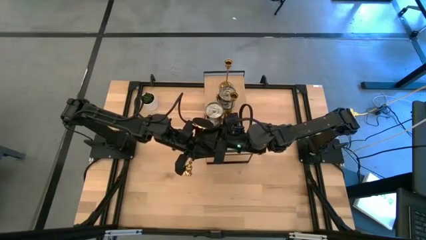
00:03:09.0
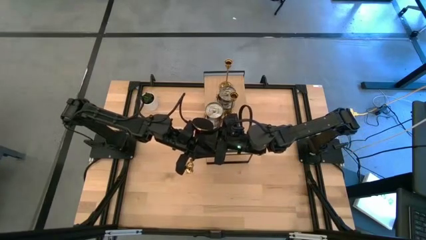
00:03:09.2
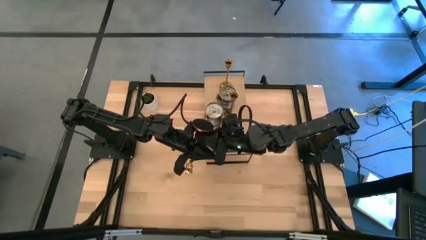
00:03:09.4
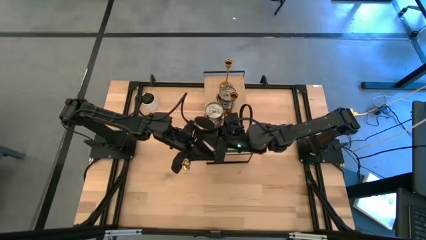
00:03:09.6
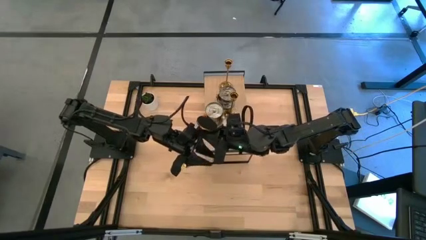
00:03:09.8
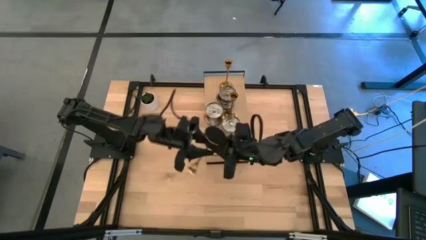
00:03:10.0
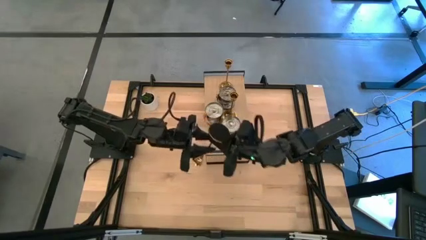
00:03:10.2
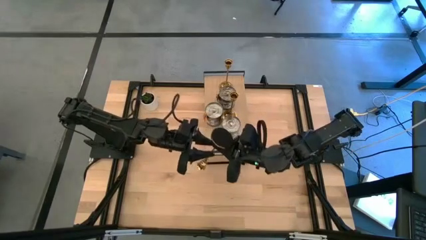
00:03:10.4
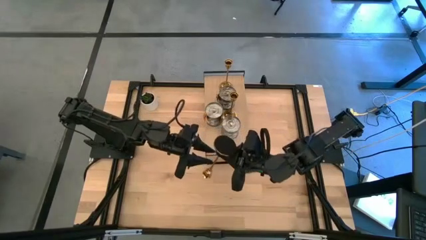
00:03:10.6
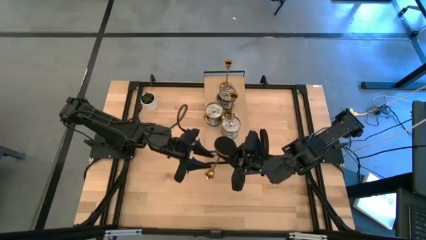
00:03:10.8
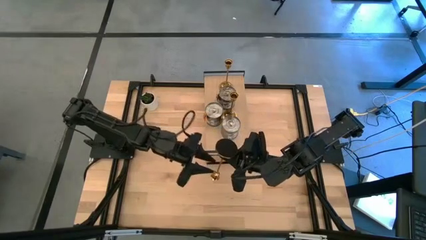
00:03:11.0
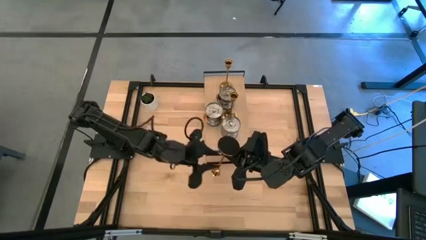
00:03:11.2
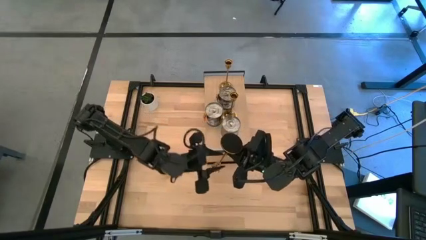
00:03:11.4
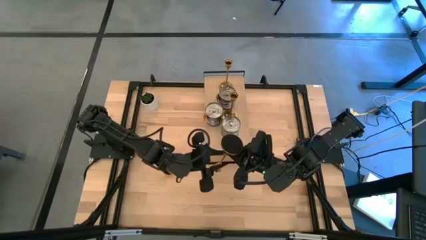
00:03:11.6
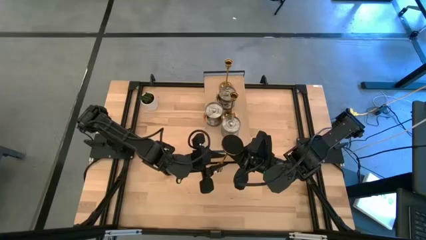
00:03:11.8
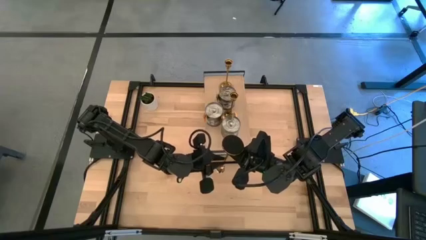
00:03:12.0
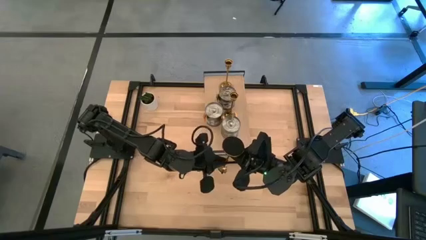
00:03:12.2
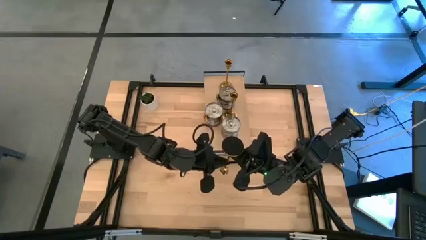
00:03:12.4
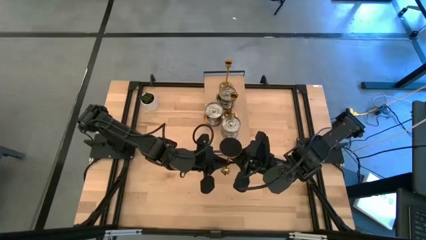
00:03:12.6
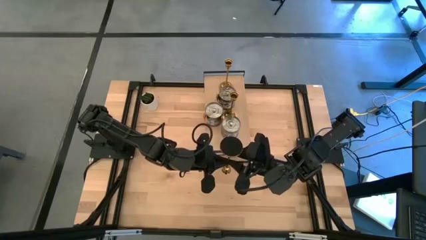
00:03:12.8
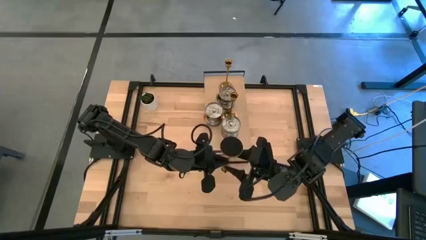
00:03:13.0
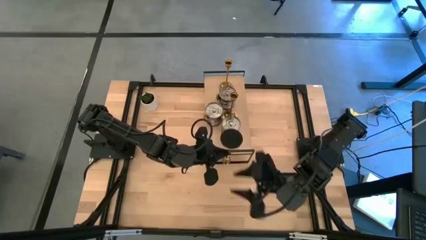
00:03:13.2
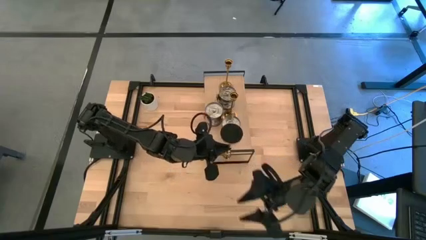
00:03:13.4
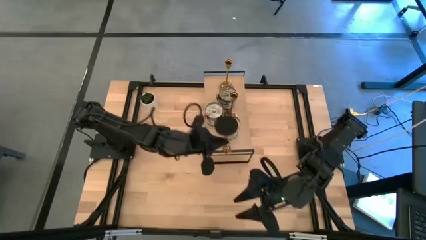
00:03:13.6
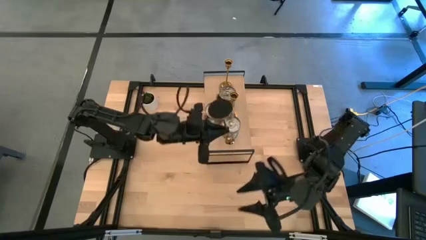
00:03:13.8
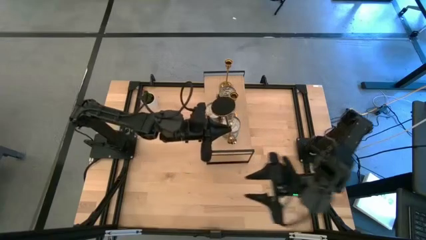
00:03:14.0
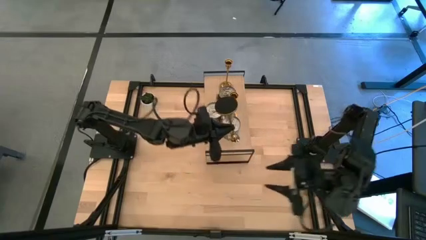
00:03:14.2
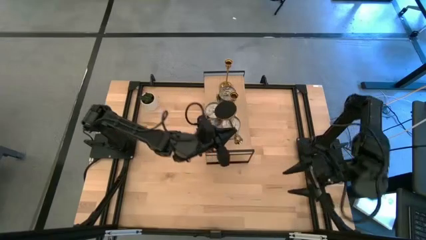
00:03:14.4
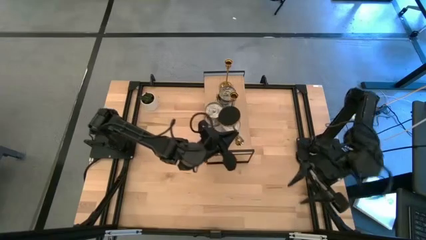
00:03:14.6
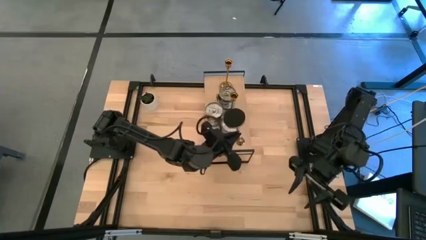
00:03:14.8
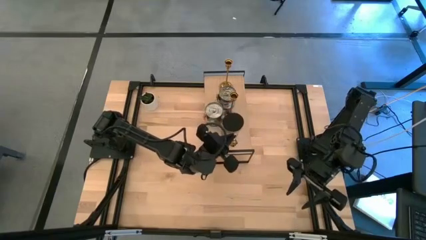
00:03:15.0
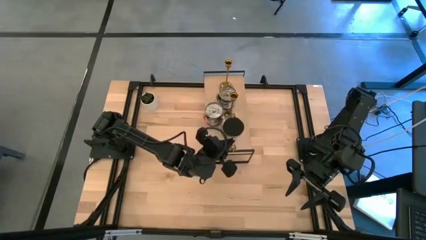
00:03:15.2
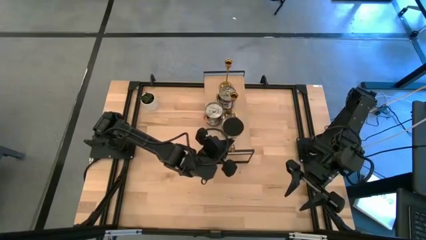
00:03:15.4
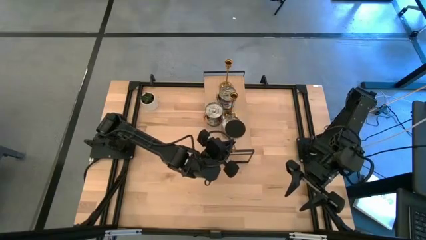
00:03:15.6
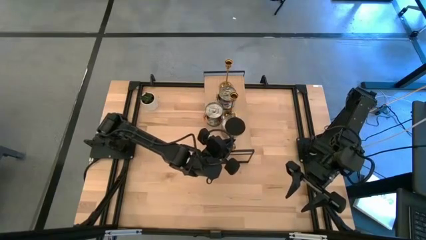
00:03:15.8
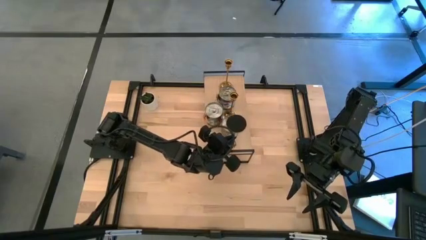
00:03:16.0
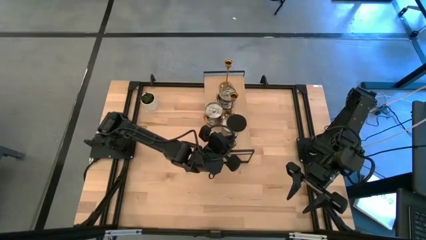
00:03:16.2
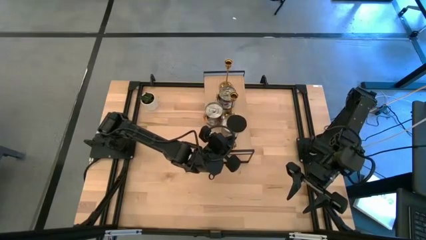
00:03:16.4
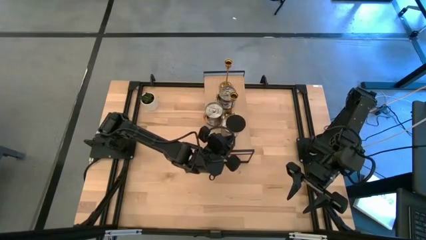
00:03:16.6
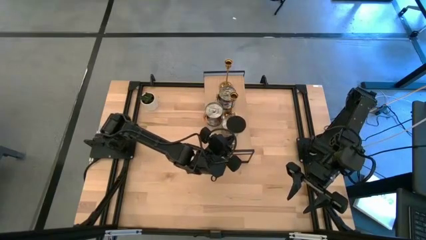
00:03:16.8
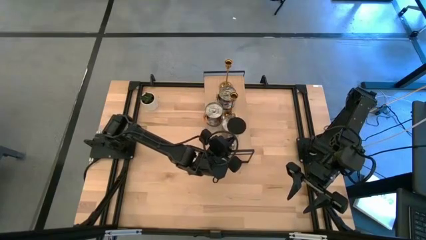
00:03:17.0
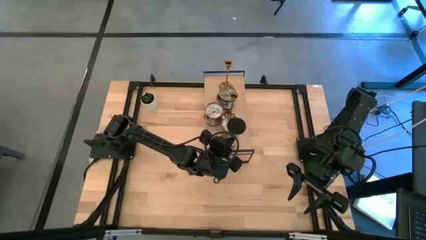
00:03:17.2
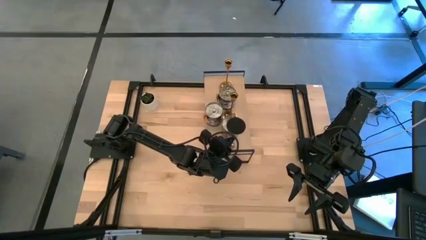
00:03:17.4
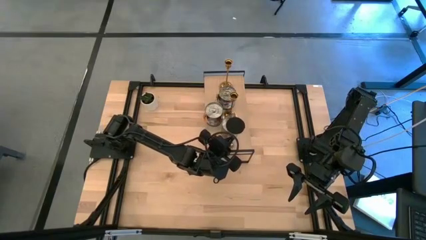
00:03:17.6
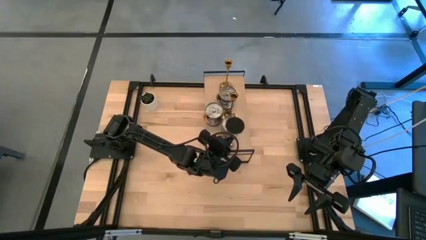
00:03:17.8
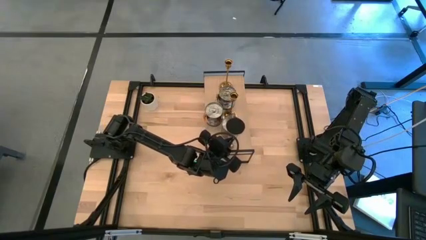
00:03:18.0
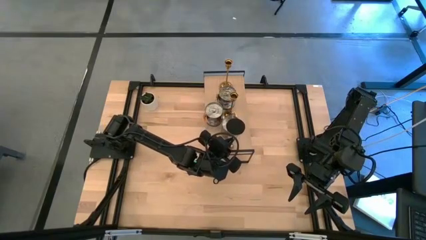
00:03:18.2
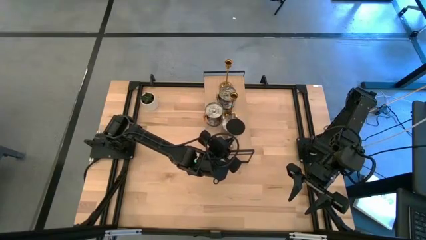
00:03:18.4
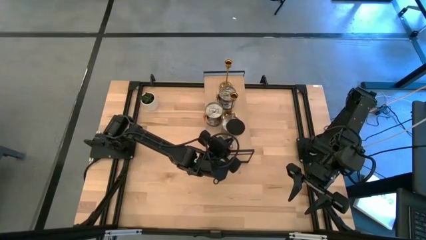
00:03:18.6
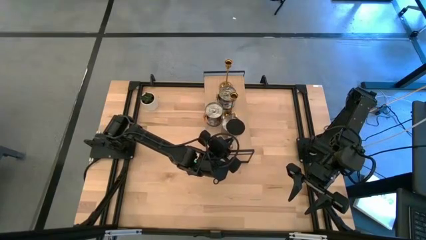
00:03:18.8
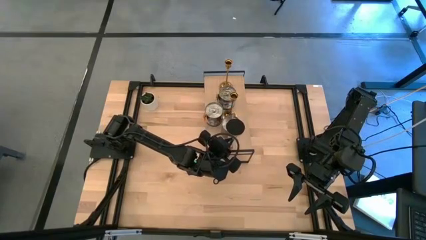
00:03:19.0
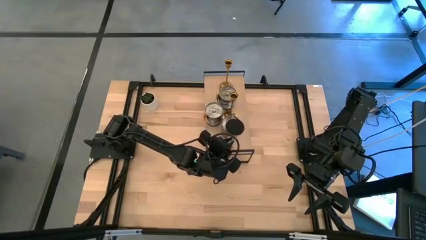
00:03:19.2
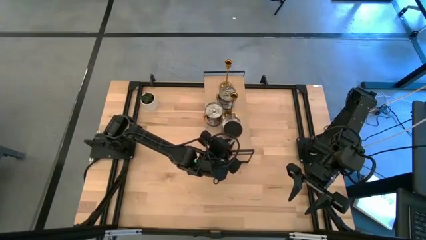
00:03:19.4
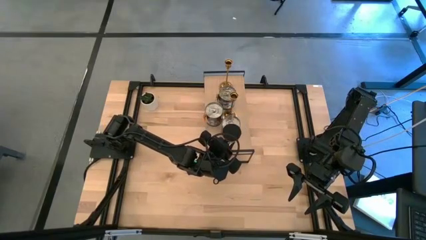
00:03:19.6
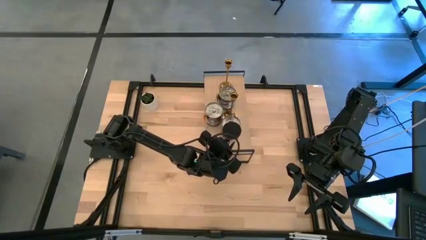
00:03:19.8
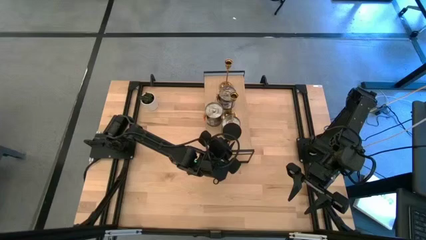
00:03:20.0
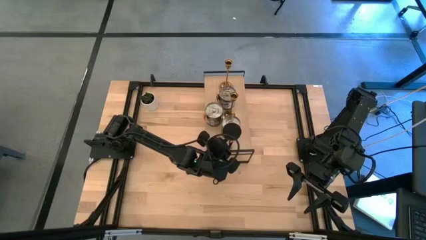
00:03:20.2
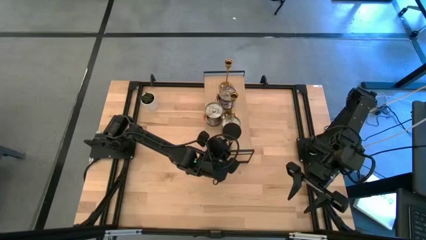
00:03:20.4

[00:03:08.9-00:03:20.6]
Task: Pick & Place candle stick holders
Put the gold candle holder on the shelf

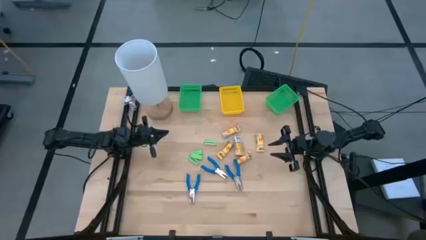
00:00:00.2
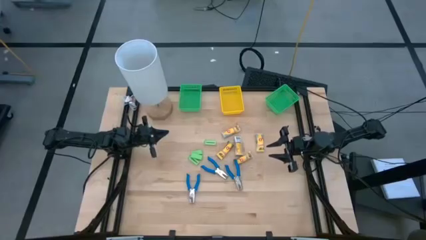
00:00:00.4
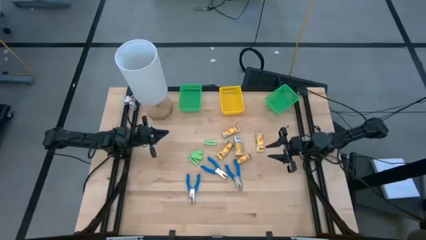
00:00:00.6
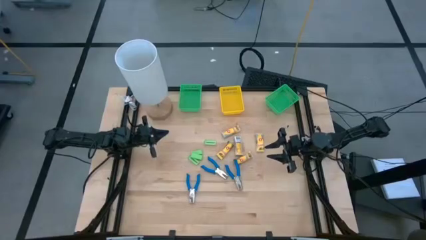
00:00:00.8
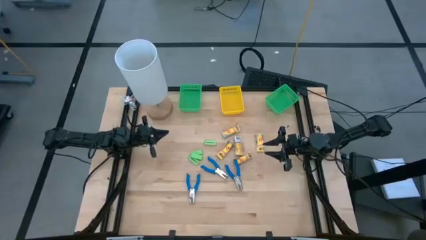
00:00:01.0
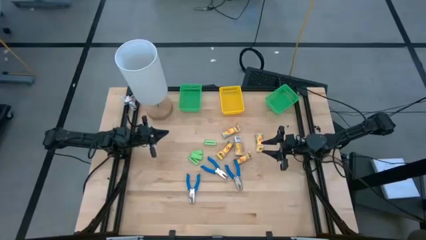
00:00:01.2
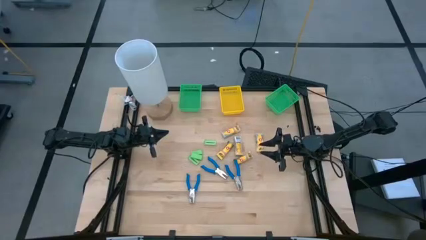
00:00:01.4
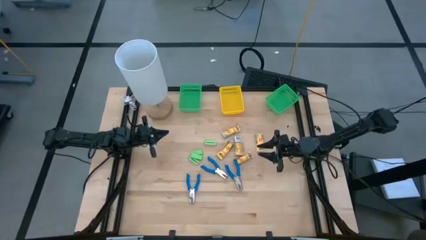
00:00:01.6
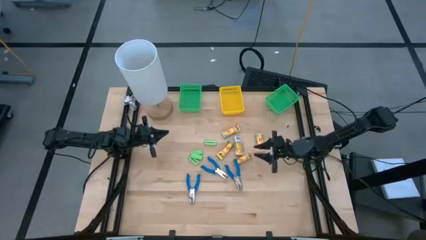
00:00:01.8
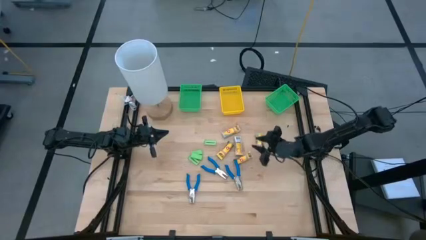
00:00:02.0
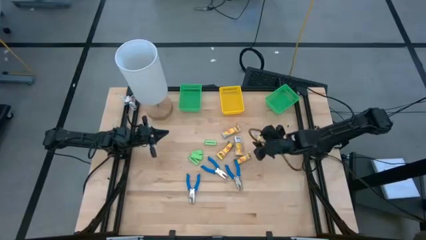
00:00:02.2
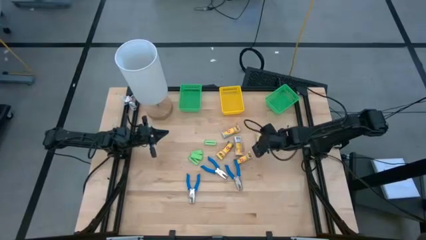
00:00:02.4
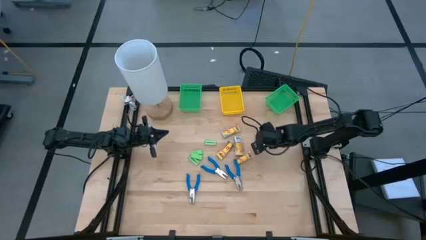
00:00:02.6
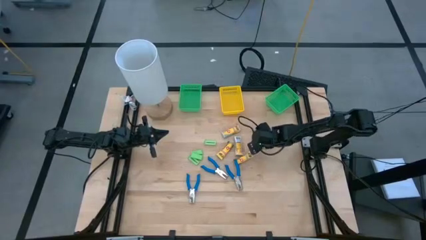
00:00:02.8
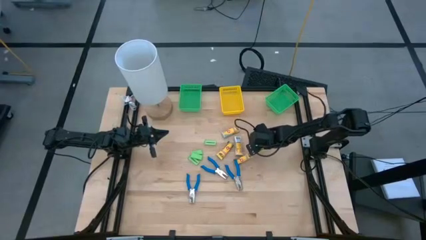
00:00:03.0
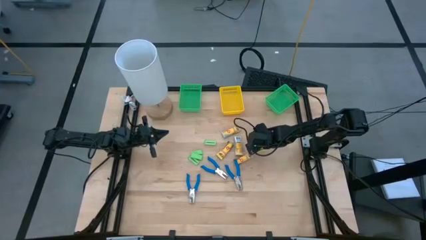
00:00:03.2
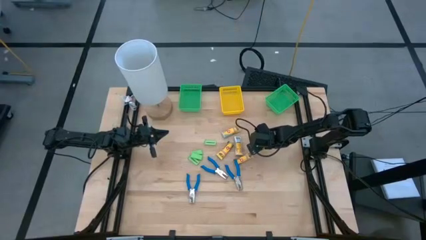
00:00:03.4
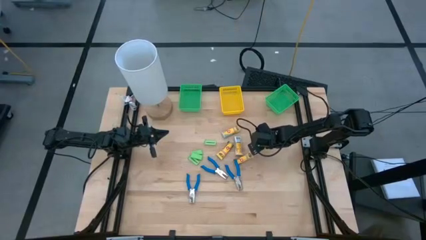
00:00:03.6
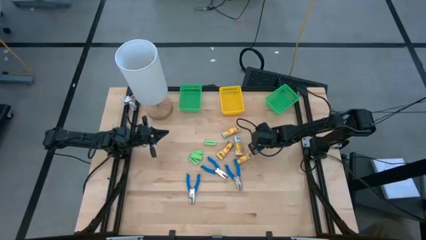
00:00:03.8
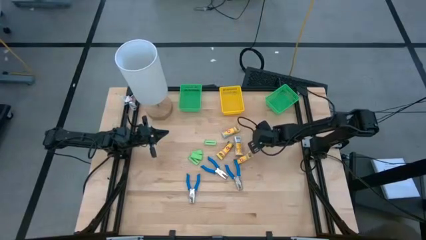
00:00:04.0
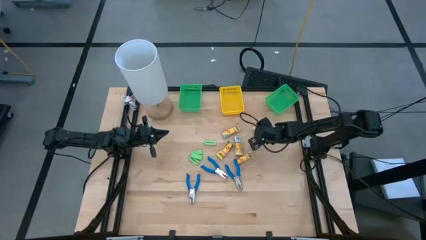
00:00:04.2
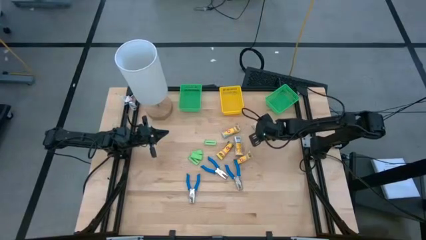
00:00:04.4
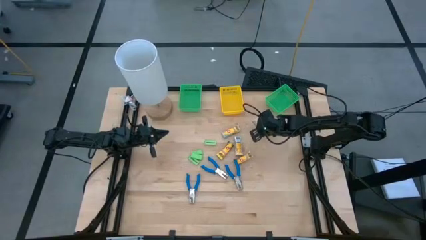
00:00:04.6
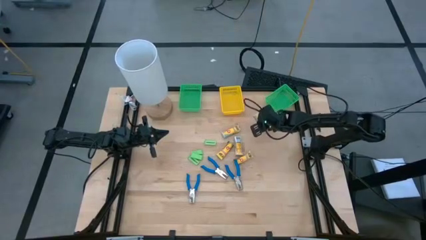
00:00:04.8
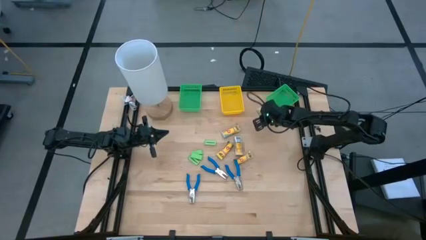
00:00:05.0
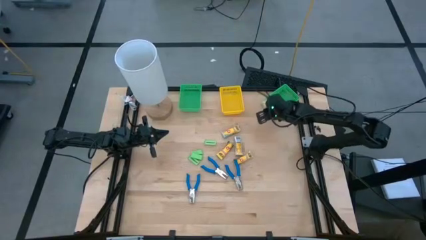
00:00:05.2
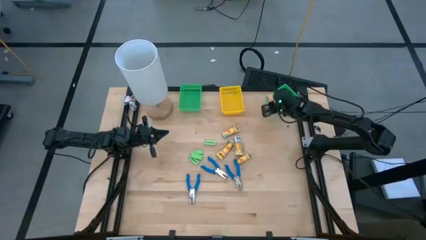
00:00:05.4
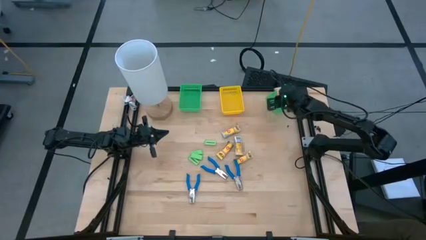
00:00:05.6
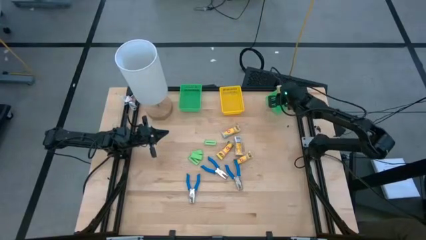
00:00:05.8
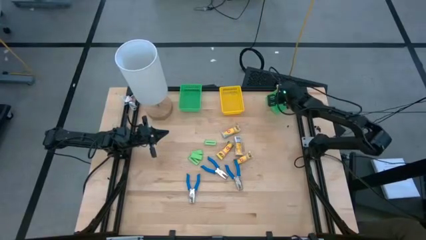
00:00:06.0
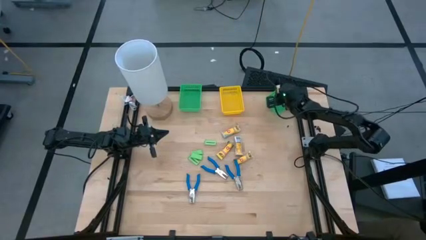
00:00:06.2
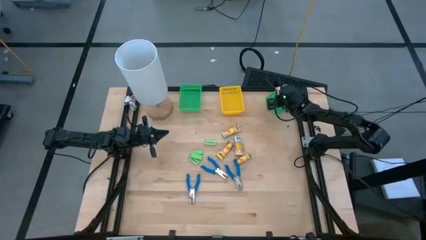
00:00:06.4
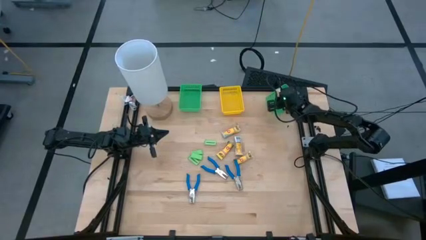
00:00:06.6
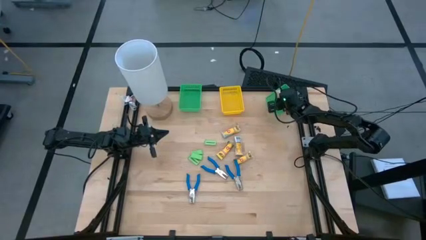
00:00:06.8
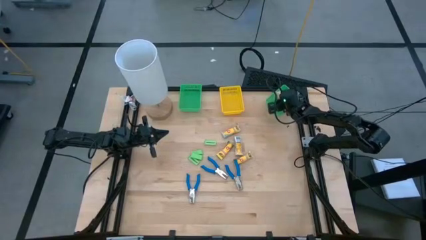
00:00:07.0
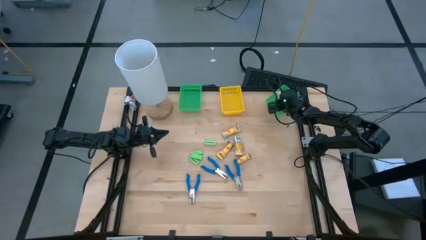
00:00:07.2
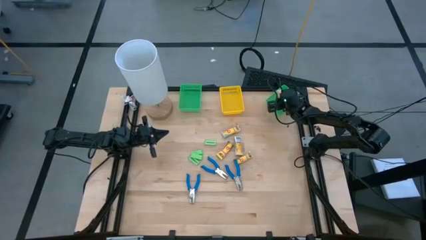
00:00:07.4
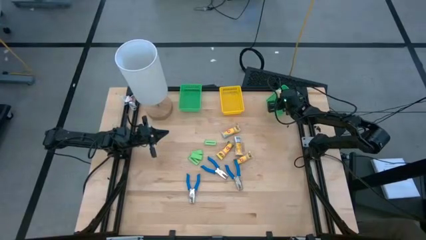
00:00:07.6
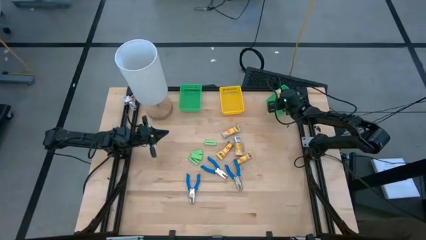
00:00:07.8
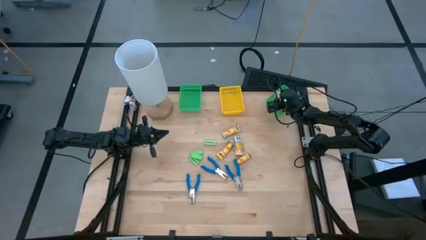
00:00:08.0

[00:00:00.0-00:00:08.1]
Task: Pick & Place School Supplies
Put the yellow crayon box into the right green bin
